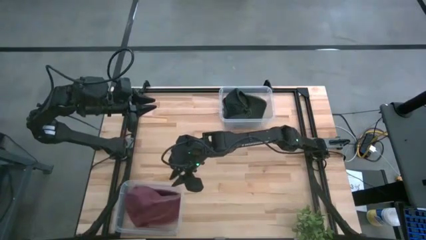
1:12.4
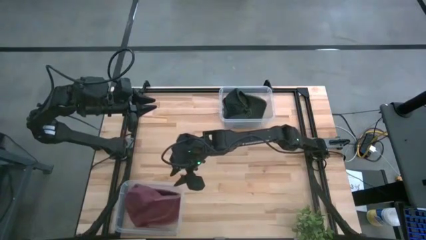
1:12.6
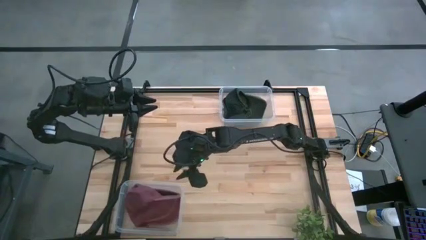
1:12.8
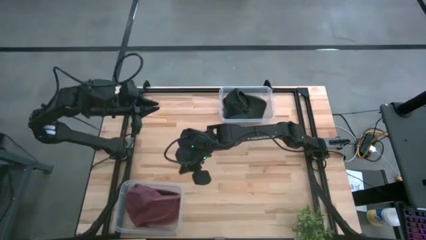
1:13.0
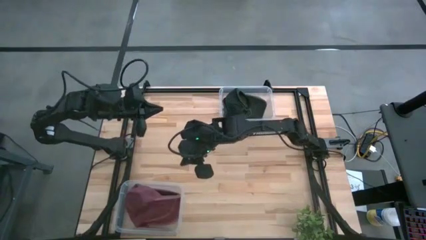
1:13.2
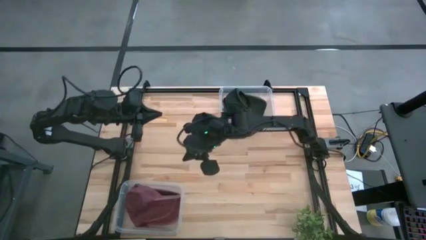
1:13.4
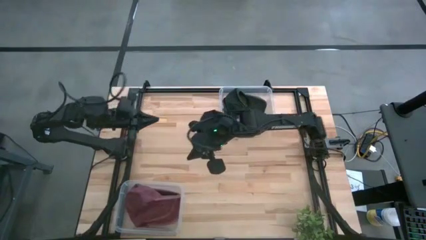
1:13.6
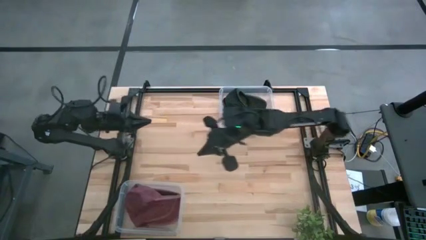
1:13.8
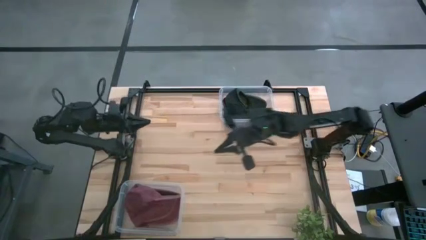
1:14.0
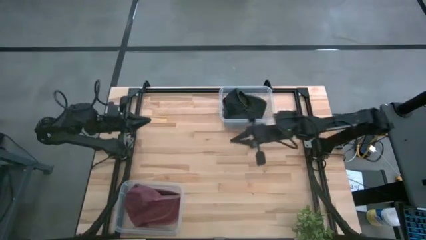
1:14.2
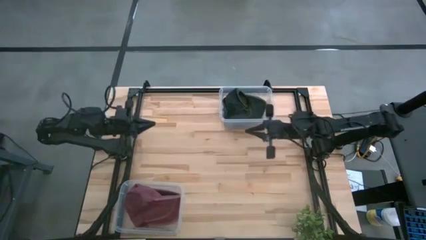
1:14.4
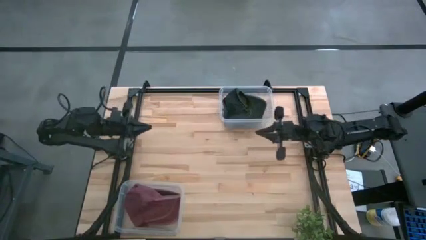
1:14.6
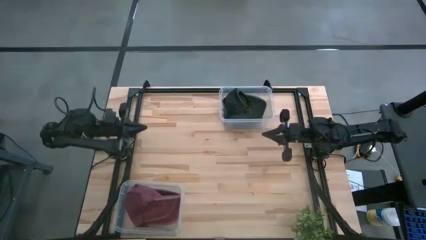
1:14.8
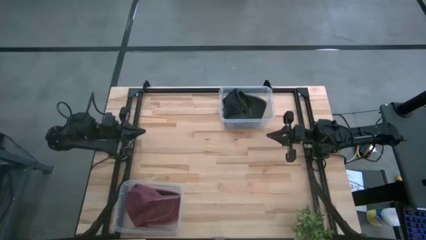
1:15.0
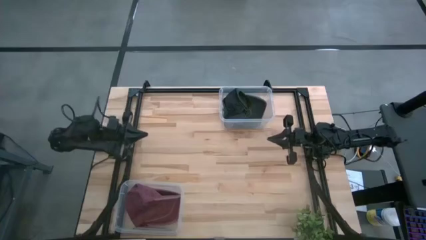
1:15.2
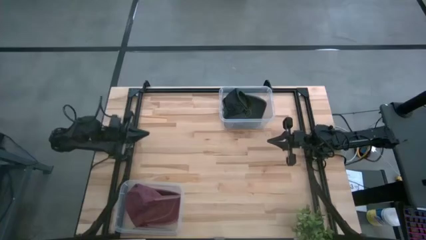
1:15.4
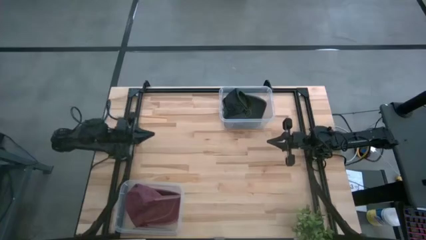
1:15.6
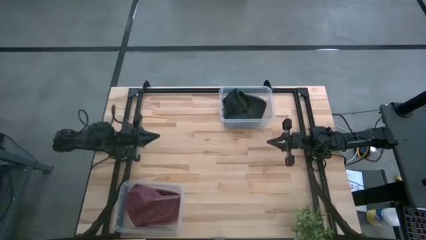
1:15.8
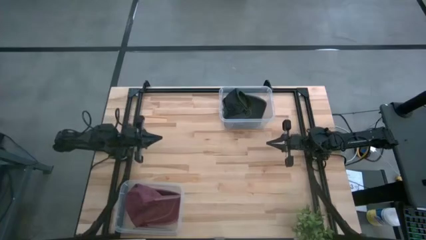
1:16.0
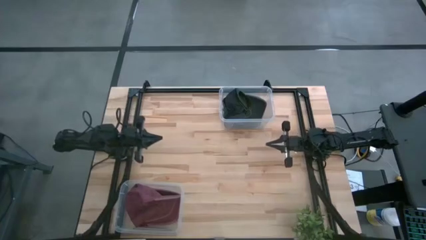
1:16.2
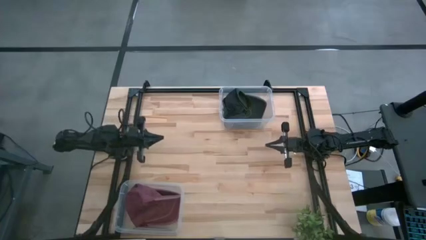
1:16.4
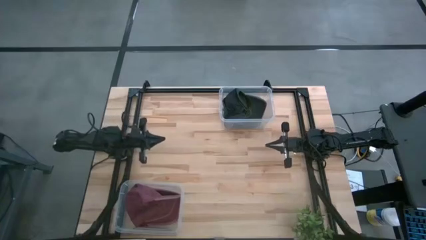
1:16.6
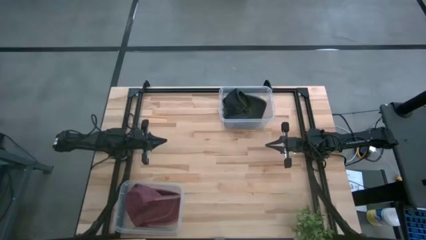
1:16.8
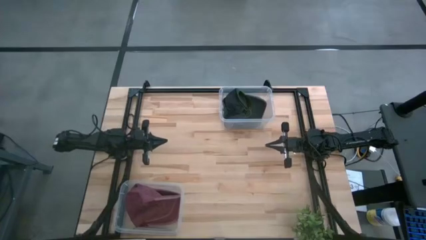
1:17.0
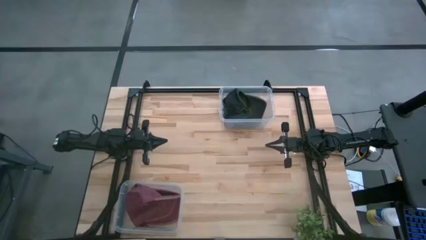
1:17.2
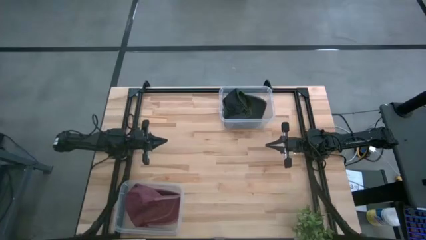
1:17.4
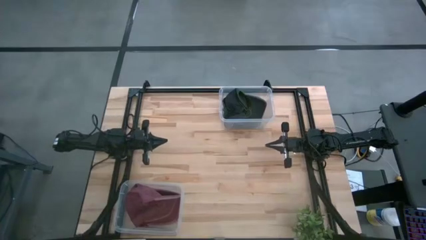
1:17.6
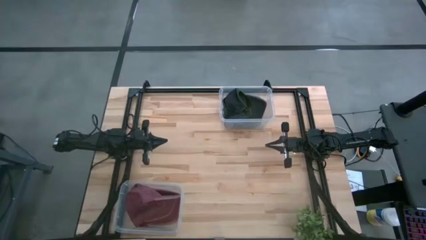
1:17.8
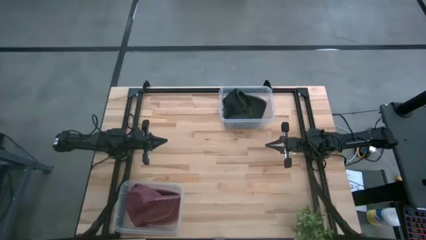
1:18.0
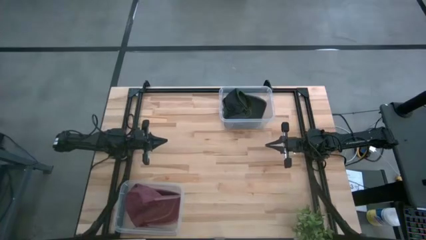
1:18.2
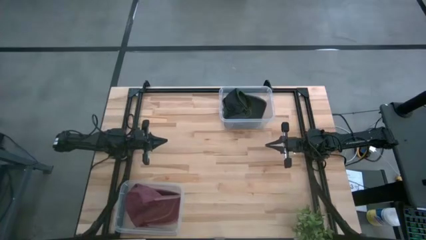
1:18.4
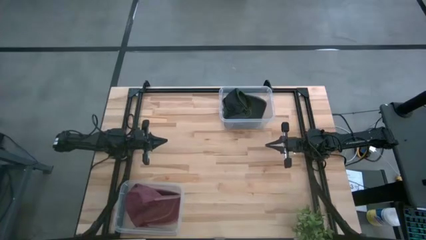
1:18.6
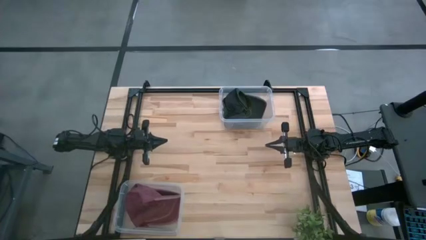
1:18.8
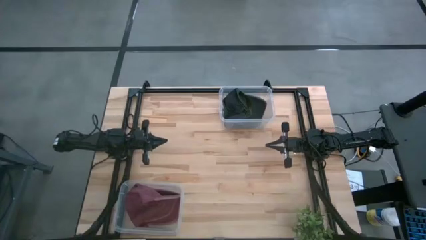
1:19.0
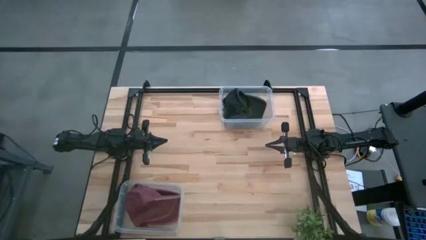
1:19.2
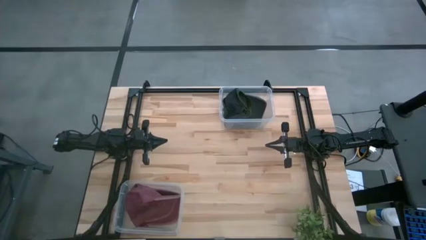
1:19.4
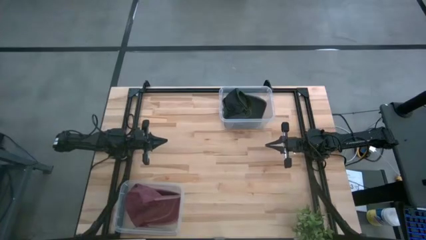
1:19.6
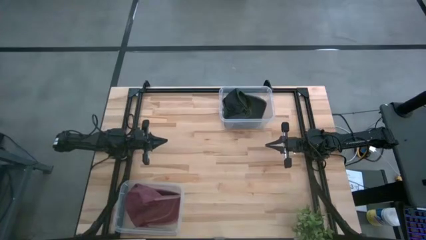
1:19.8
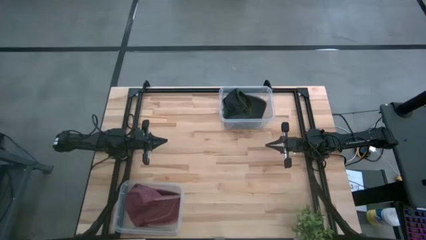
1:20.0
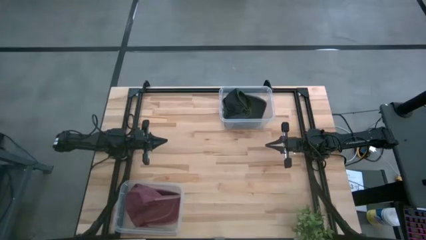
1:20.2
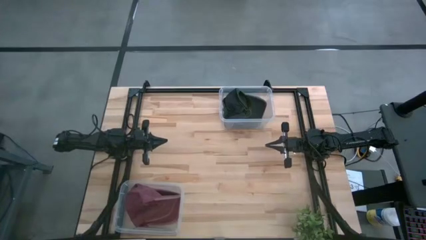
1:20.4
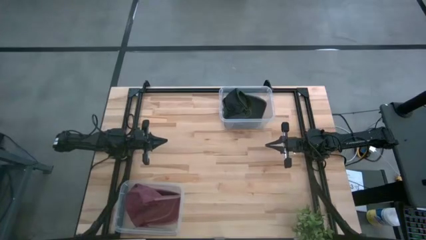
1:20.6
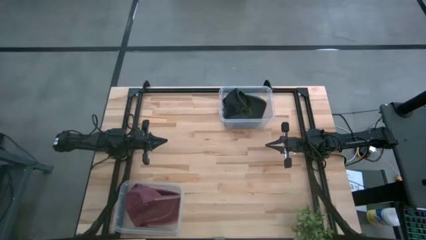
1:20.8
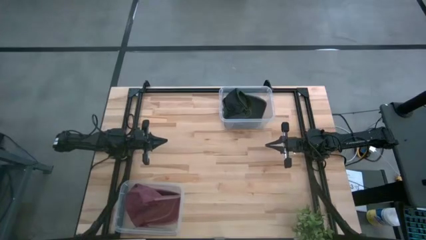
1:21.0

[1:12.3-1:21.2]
Task: Pick & Place hat
Return to Home Position

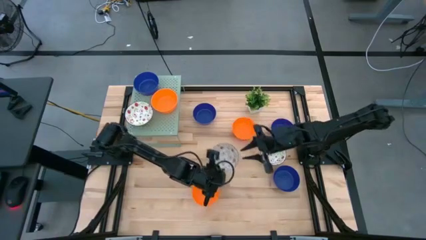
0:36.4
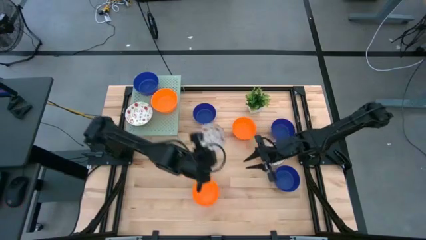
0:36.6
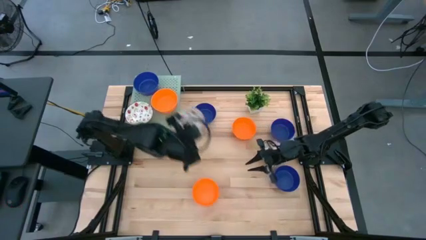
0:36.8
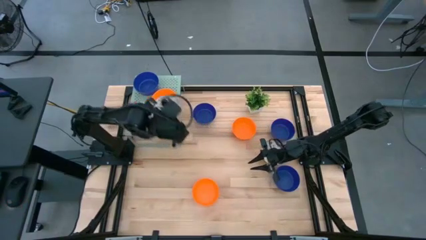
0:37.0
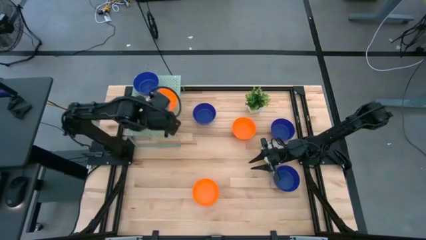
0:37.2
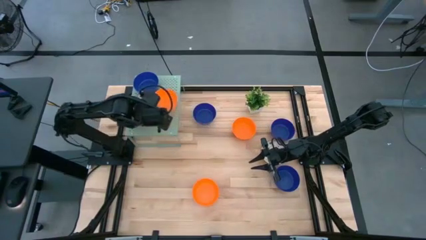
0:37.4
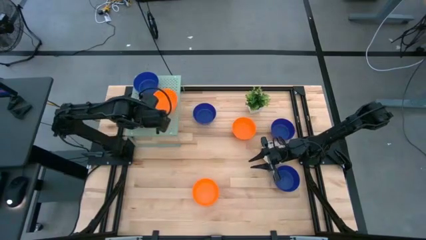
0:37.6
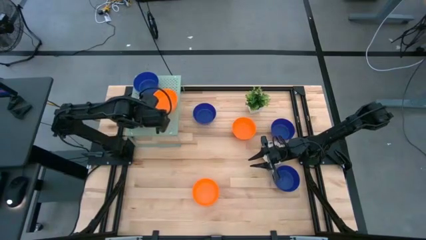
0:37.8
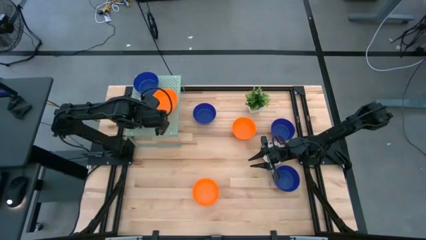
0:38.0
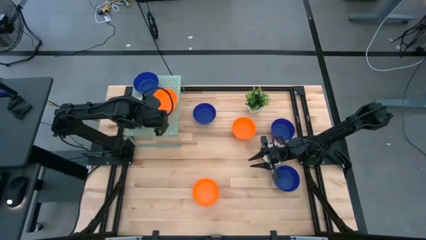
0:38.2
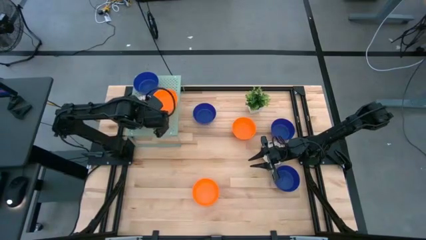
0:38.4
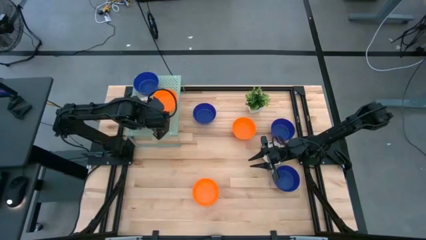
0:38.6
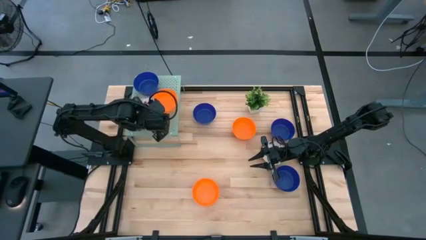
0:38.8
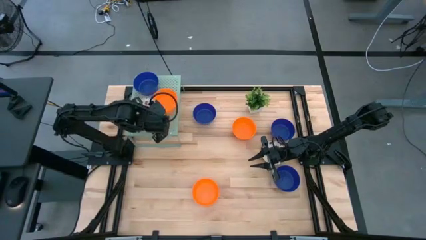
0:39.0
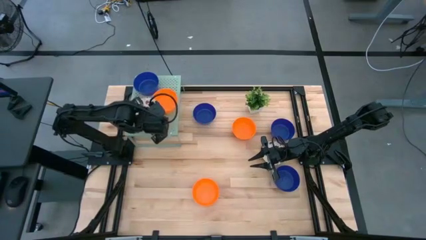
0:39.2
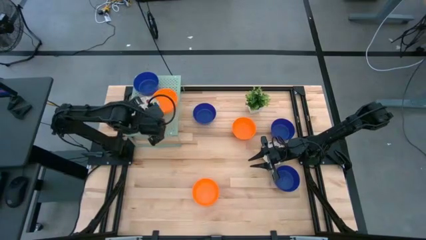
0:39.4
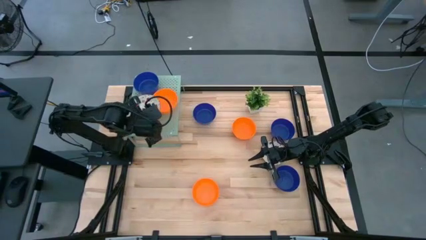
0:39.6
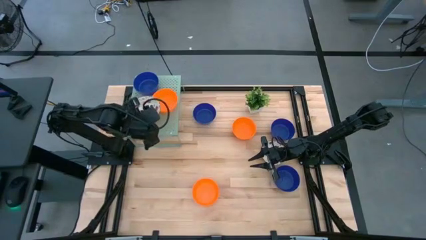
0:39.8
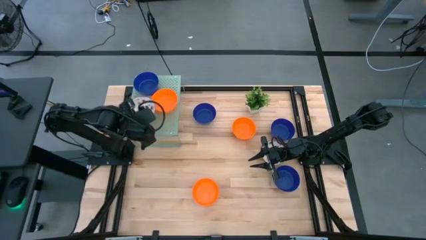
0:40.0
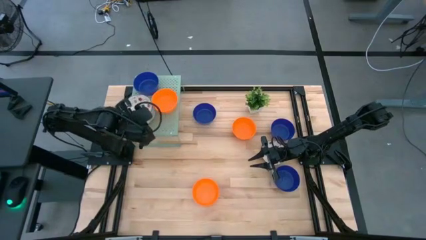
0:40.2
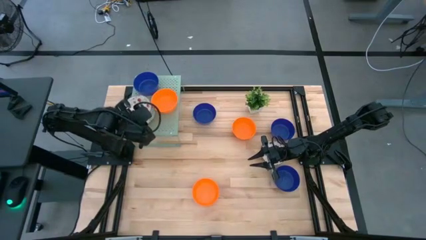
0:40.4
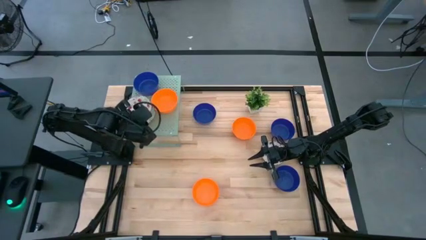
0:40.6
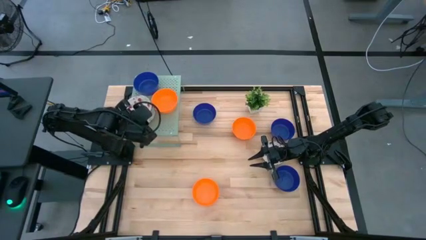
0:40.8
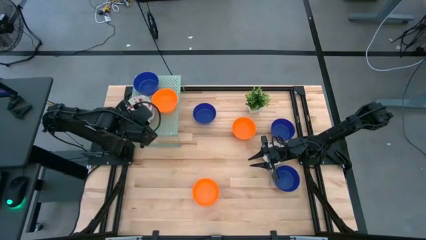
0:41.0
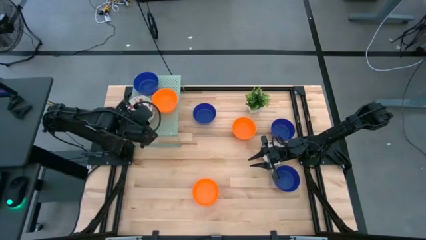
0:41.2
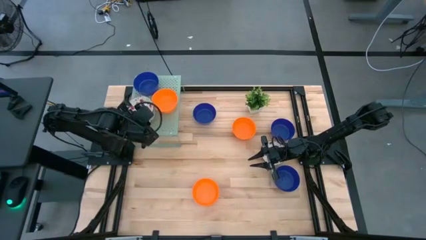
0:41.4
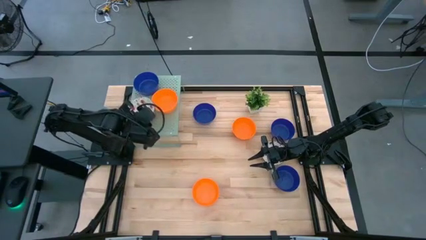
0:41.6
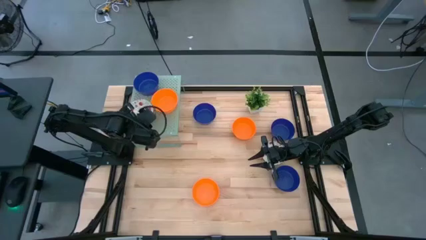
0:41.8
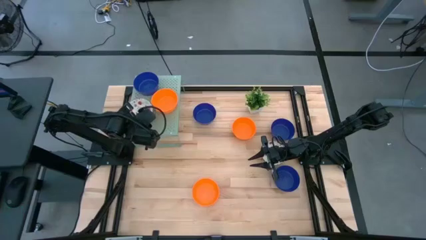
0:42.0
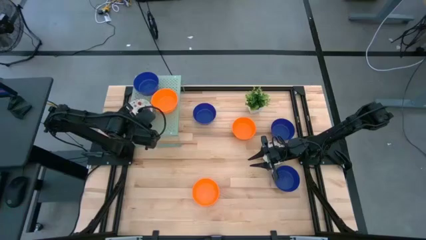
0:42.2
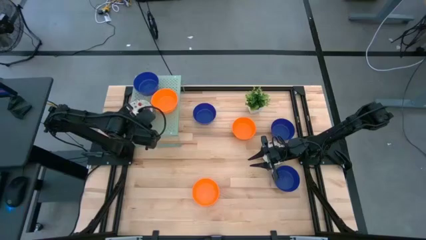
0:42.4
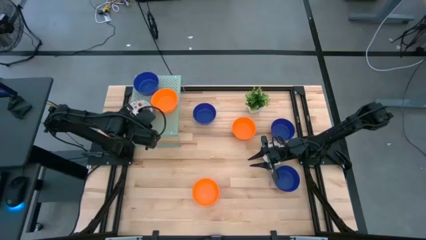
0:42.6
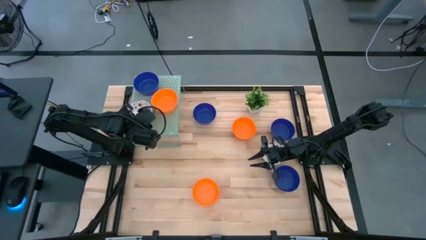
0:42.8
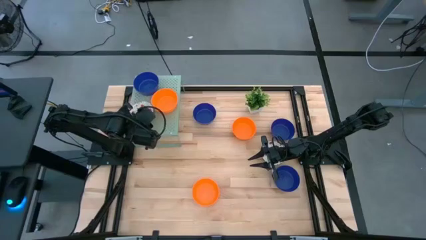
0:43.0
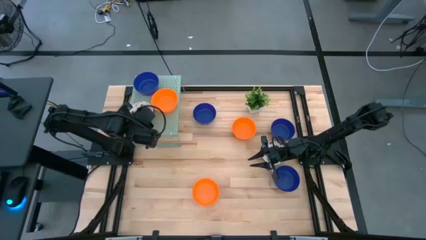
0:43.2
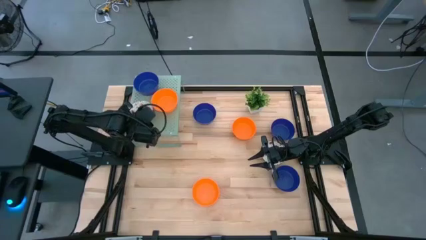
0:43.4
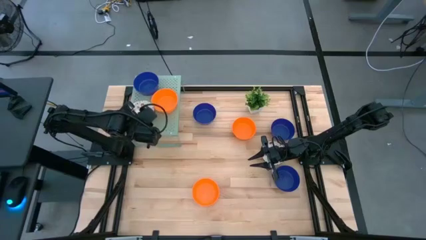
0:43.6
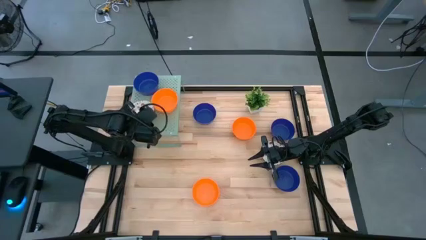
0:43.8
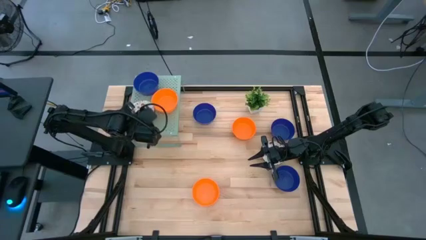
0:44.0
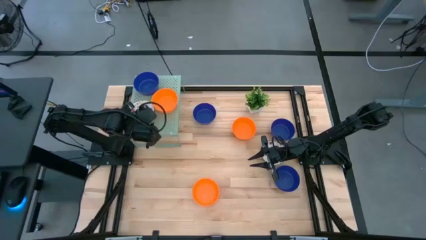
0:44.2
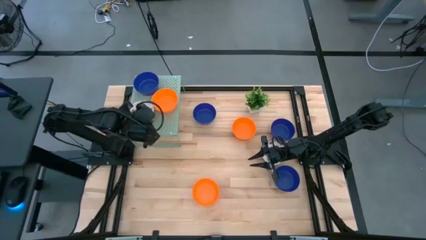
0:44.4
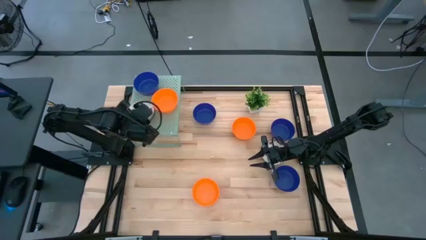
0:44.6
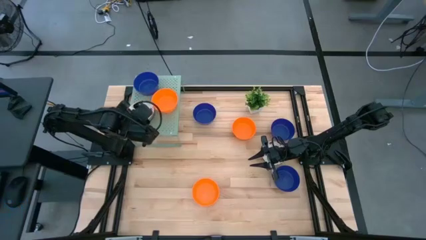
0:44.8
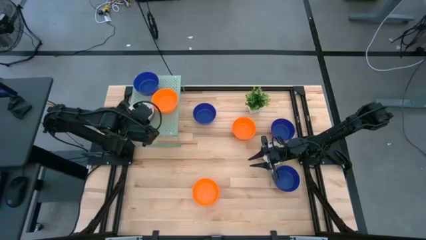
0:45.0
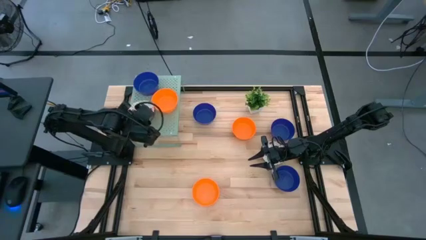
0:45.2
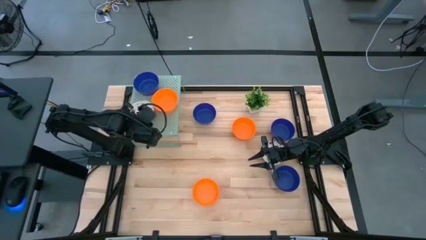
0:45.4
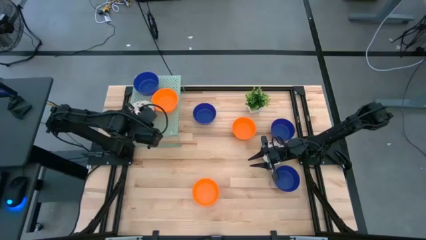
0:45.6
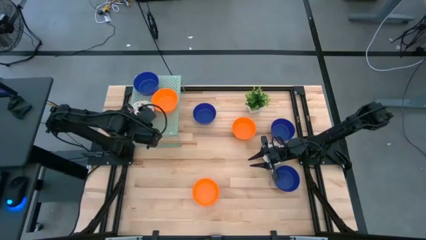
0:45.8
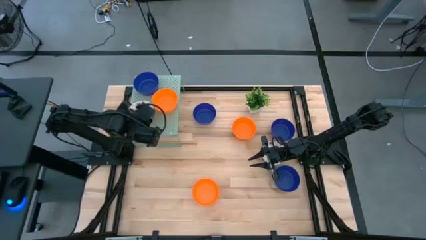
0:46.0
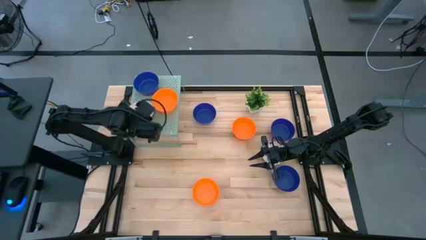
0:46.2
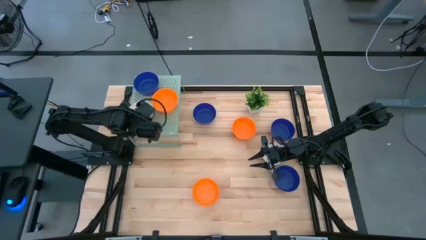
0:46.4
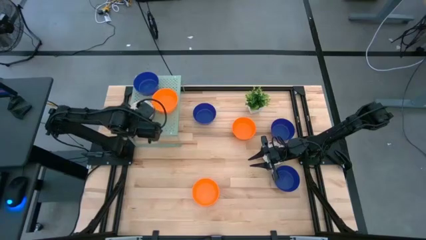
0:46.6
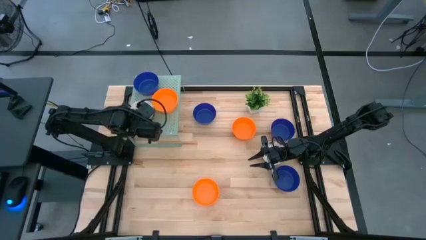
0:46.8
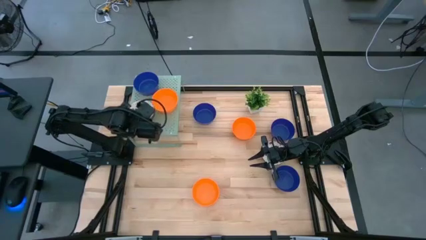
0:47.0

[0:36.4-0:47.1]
Task: Pick & Place Mini bowls
Stack the white bowl on the white bowl on the shelf
